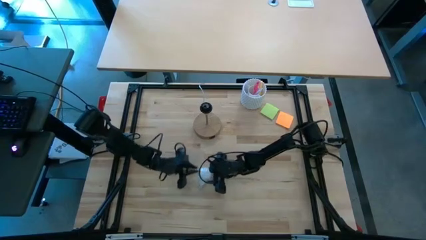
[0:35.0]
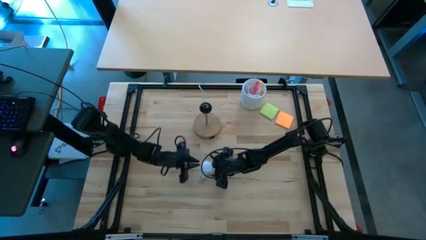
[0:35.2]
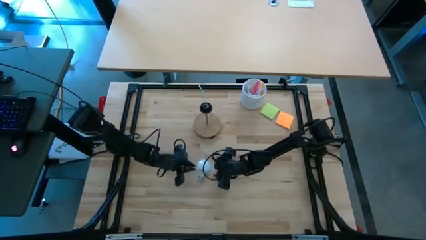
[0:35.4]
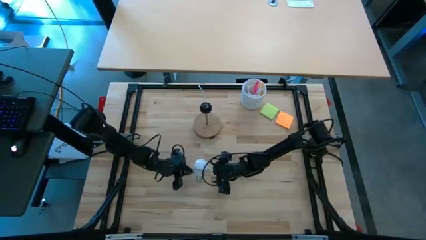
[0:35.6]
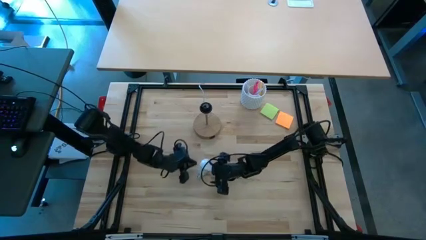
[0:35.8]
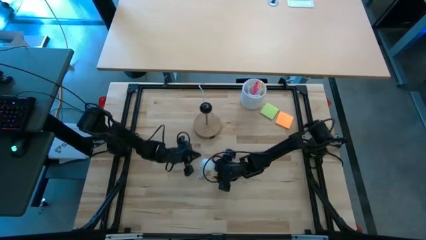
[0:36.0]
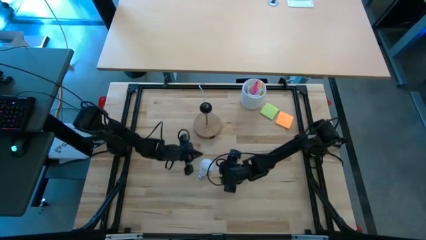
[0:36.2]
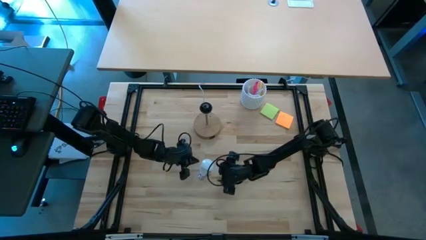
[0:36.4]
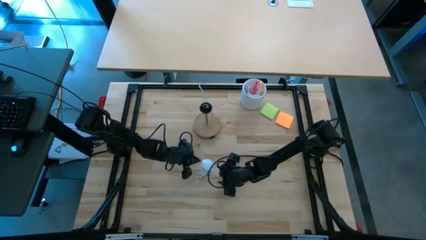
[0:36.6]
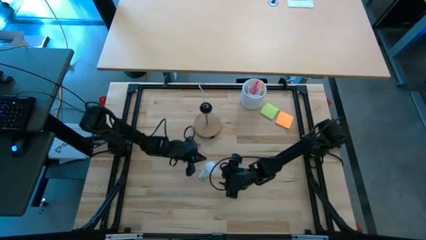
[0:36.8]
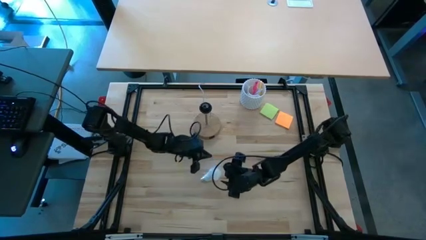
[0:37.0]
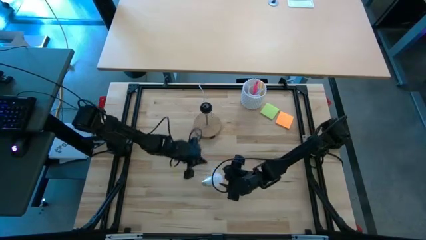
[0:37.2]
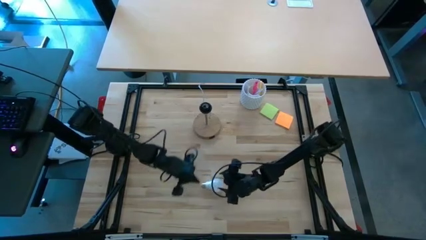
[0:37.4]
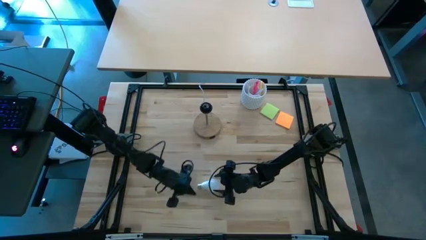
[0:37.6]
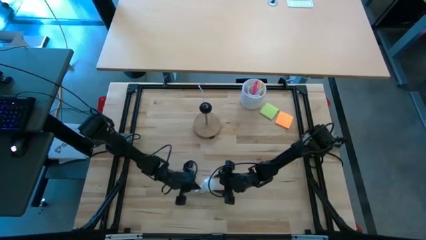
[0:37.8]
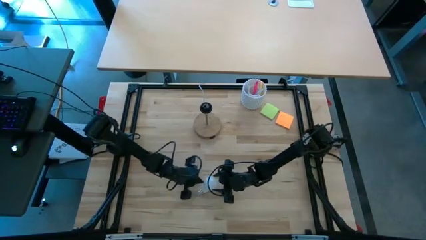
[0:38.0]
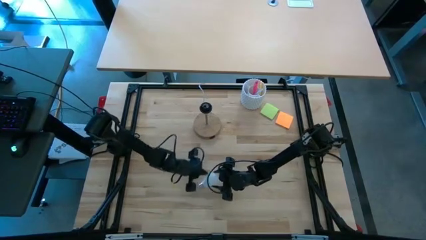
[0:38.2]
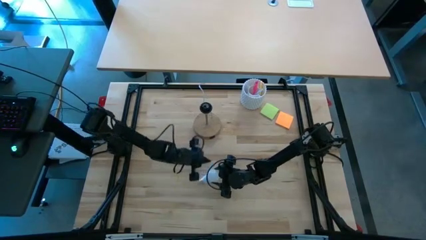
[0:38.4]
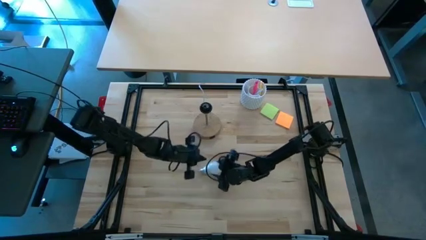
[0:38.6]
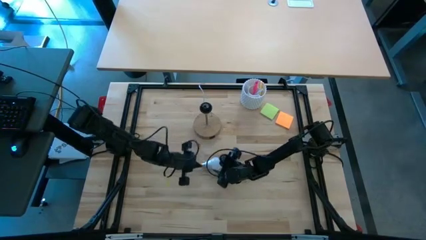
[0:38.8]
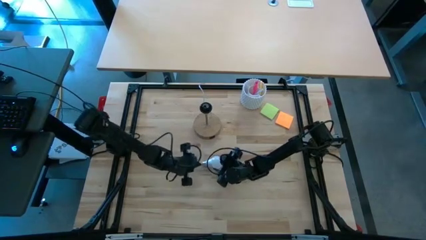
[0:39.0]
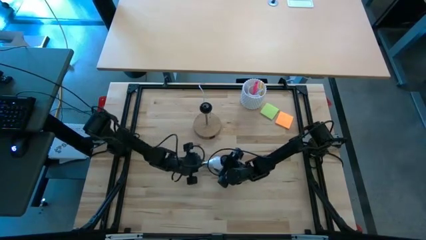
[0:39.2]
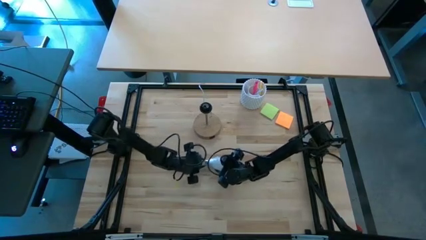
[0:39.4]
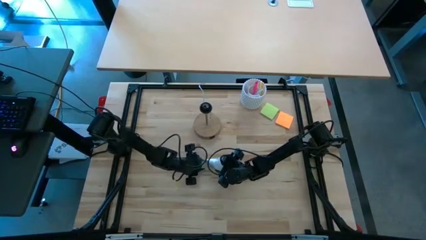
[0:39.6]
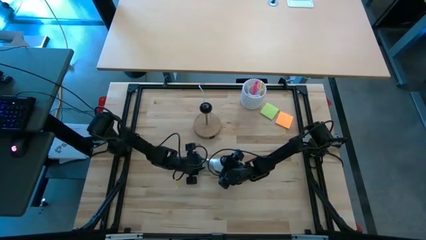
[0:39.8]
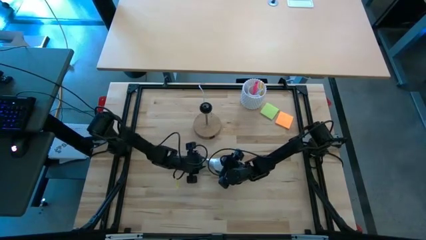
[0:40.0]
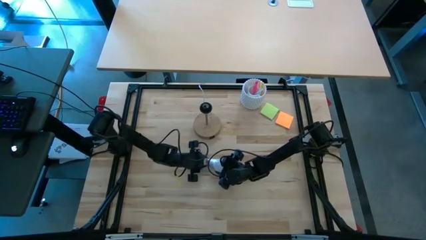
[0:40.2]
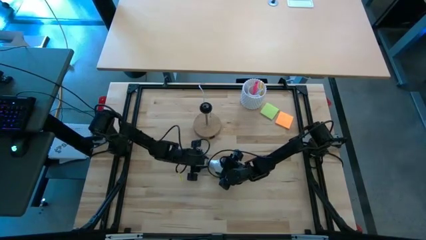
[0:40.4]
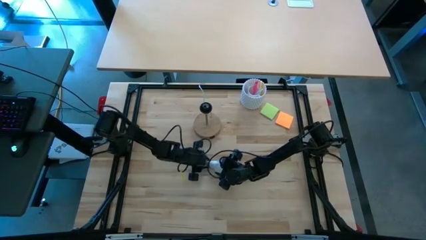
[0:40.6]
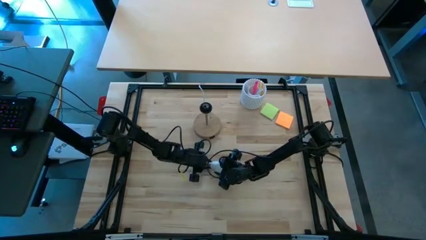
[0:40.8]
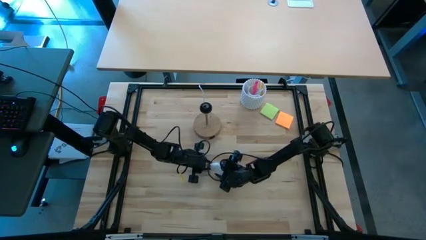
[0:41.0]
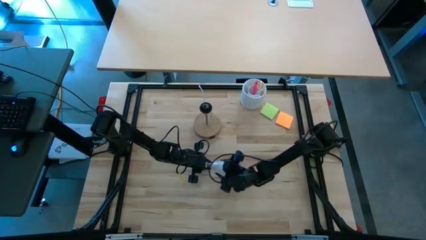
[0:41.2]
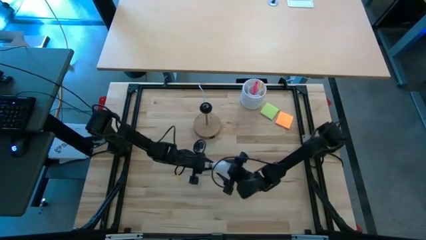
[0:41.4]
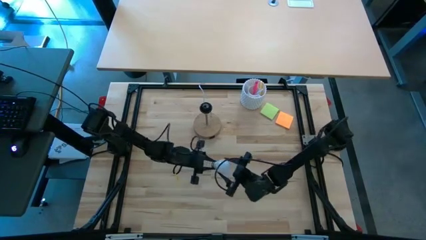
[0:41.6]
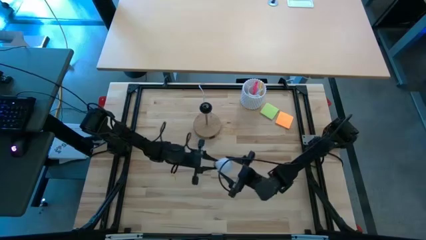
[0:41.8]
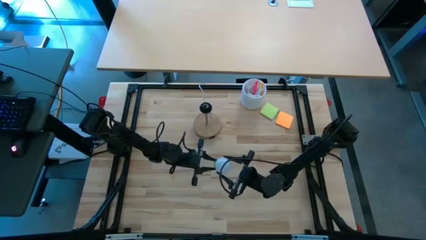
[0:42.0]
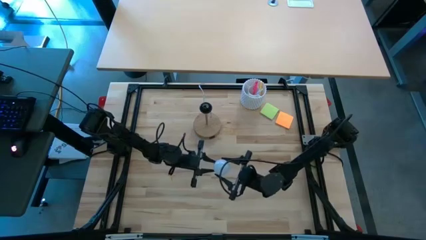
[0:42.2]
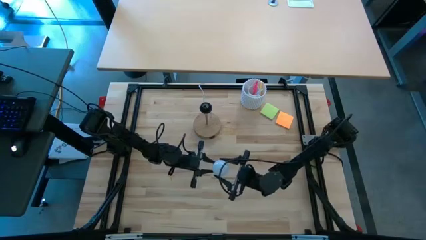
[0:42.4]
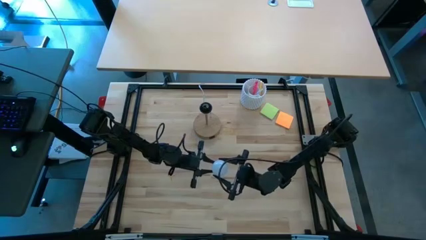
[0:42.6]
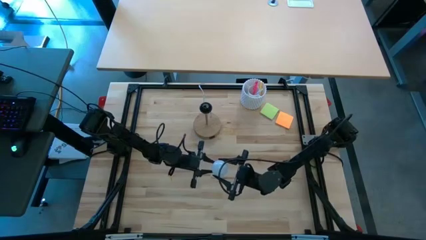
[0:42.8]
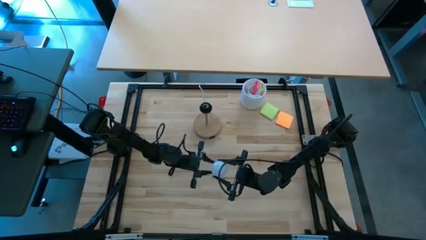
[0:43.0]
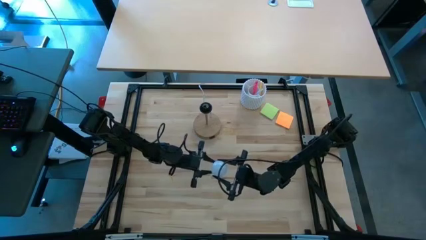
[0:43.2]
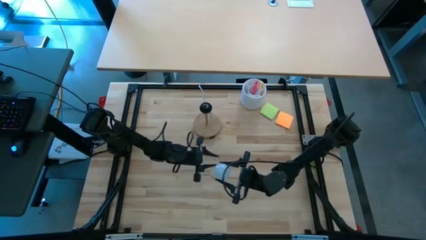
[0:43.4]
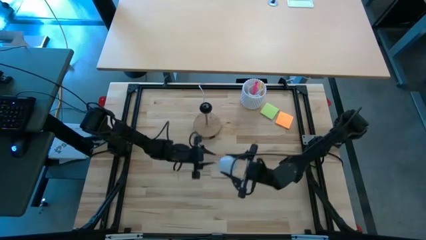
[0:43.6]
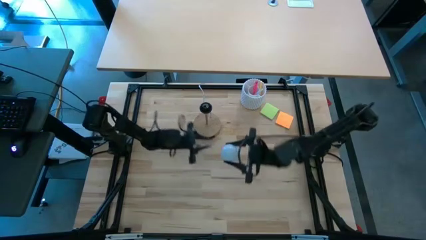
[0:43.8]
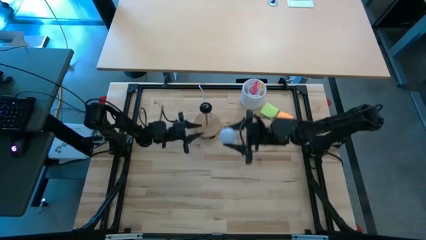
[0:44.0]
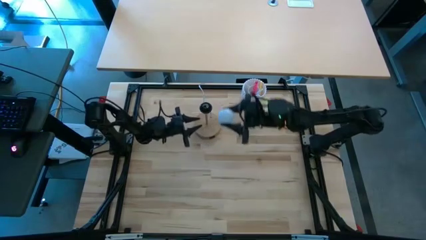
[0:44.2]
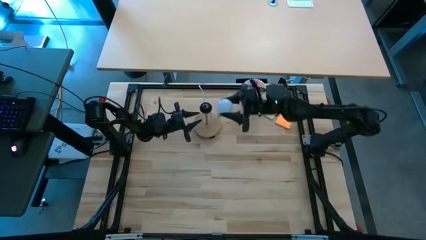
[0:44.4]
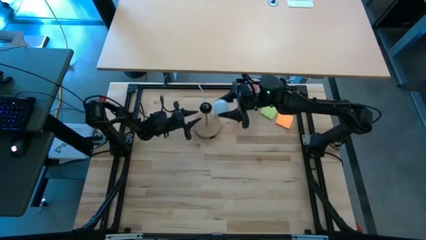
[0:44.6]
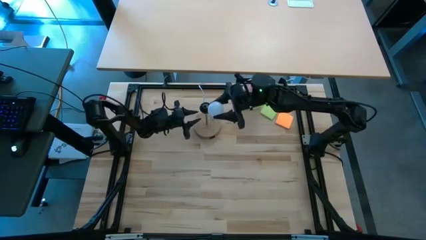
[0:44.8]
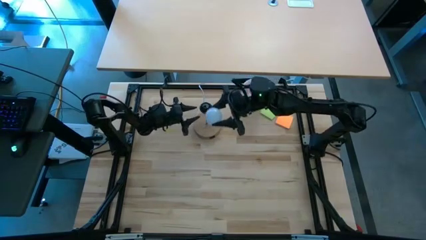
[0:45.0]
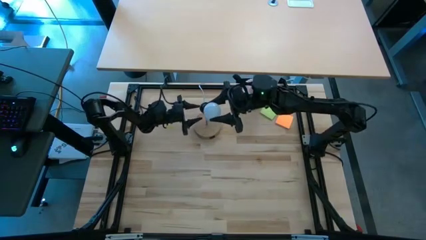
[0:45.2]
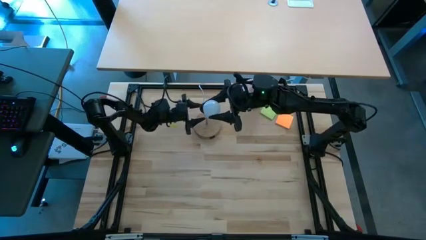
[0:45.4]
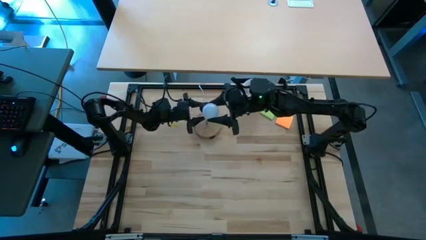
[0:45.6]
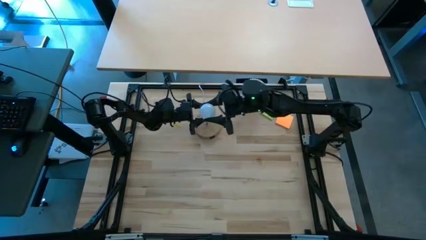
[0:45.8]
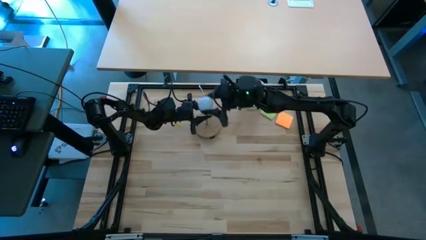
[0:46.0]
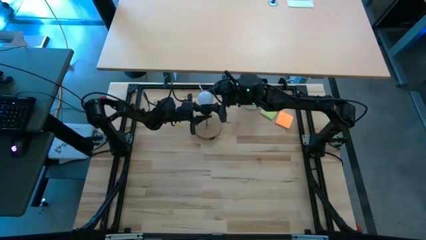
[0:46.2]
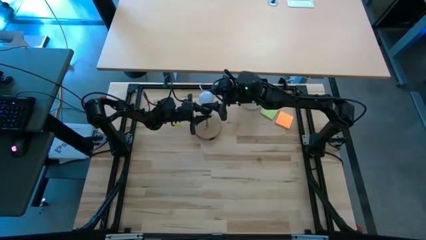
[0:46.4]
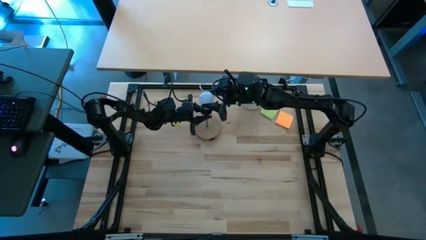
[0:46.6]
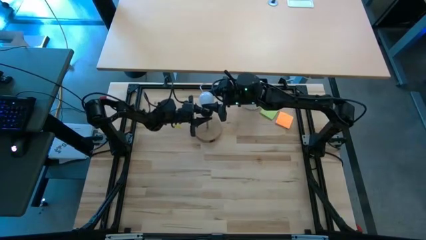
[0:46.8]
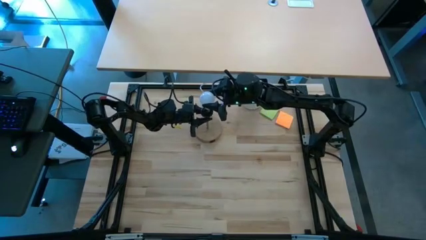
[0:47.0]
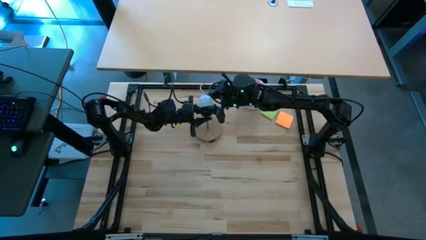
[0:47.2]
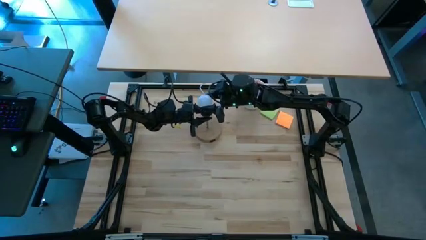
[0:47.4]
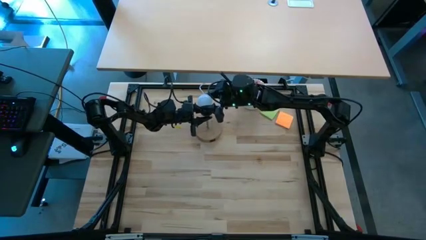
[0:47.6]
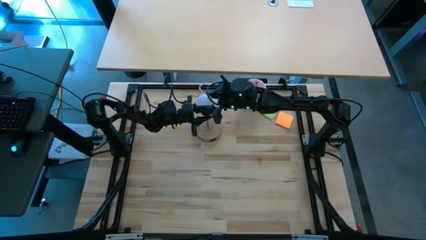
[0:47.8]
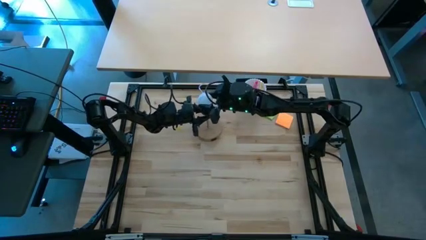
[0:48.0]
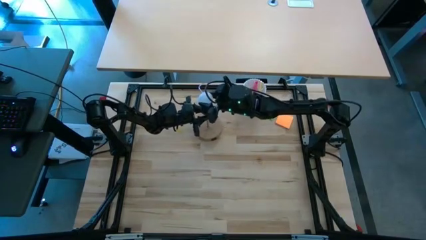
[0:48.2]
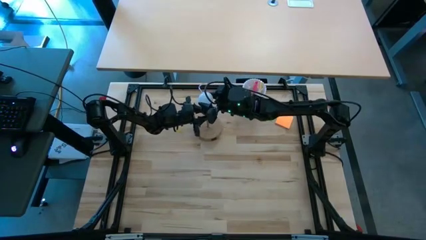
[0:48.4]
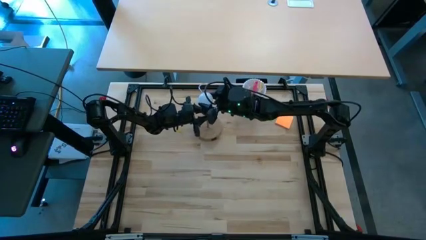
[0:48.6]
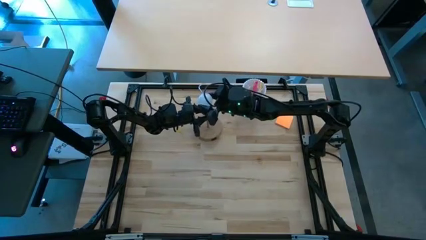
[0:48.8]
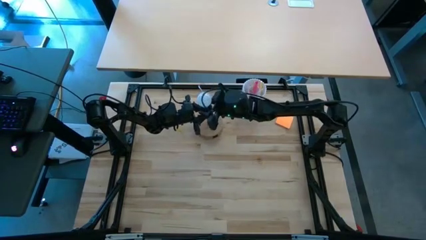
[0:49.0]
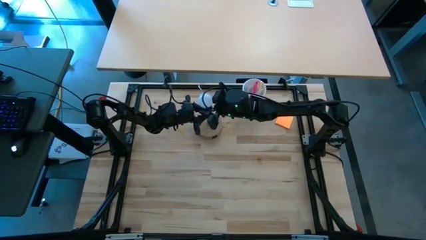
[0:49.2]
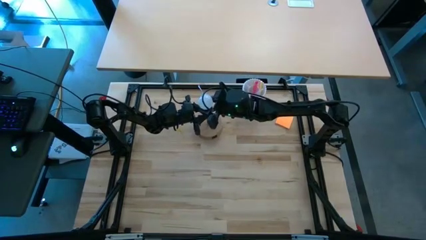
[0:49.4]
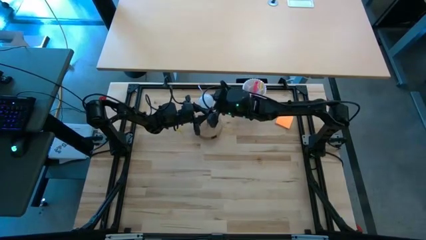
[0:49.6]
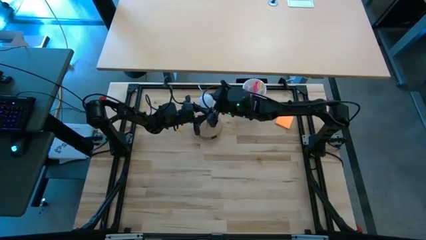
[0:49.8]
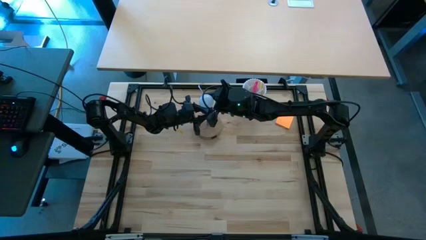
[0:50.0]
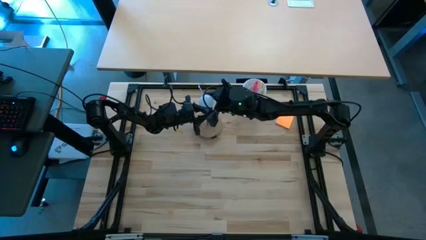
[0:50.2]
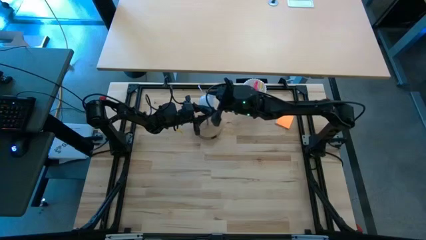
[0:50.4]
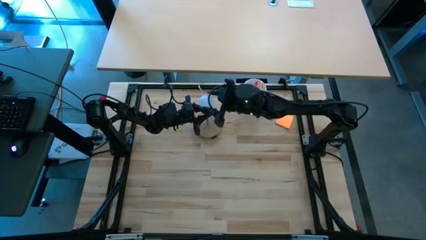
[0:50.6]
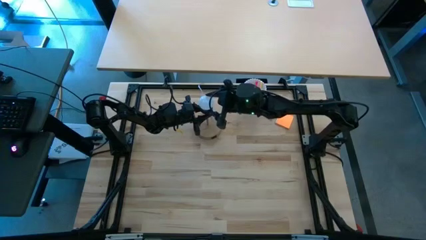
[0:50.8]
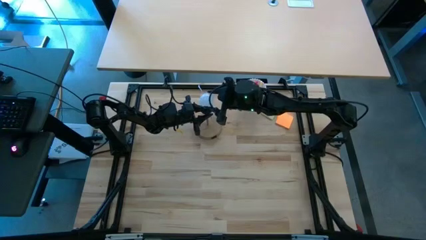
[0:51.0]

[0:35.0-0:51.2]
Task: Screw lightbulb
Insert the light bulb into the lamp
